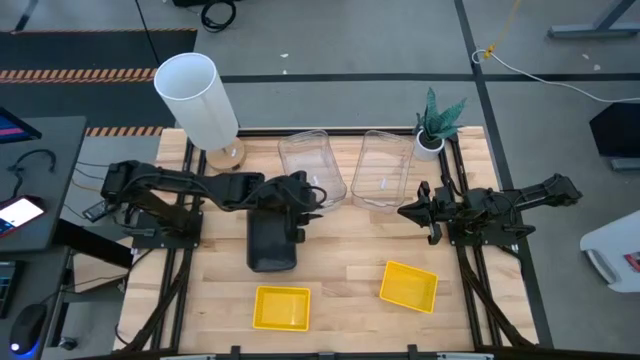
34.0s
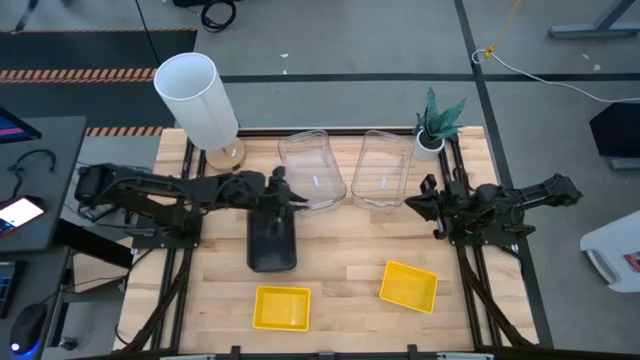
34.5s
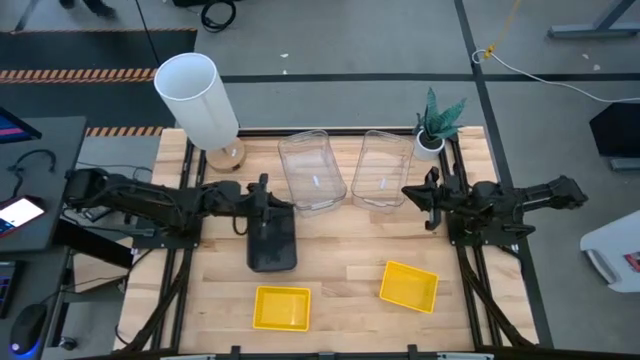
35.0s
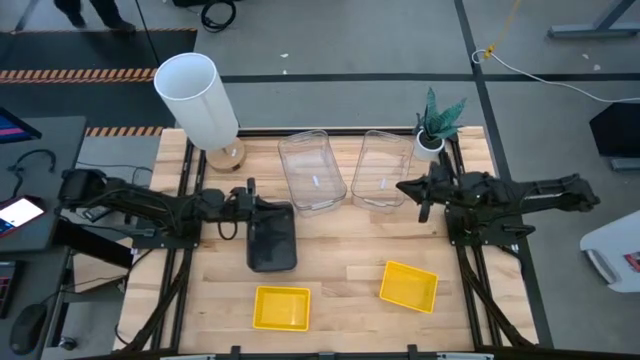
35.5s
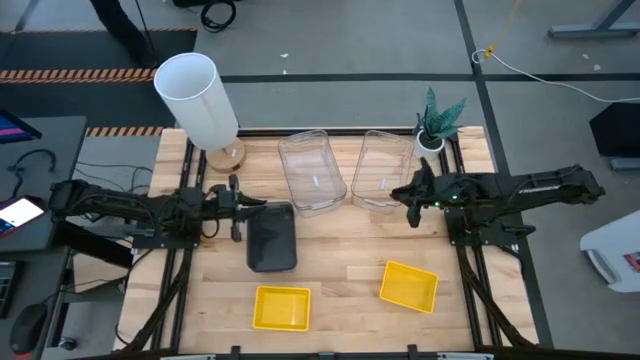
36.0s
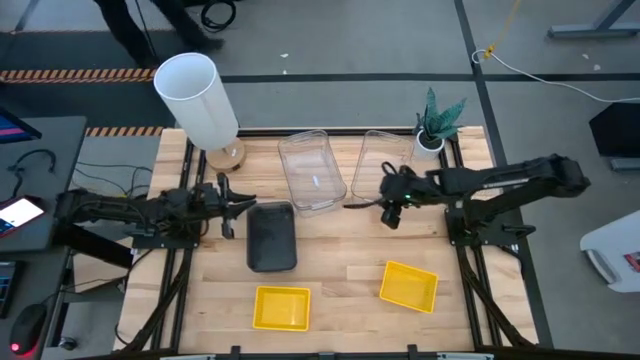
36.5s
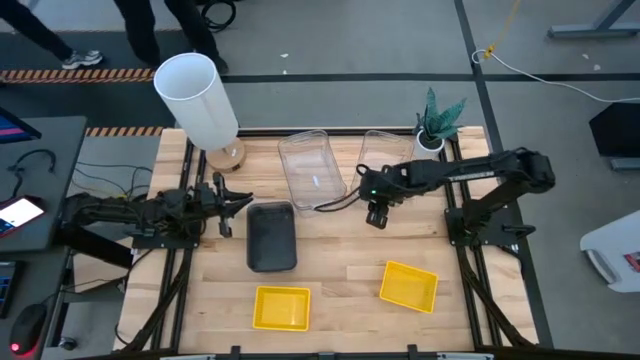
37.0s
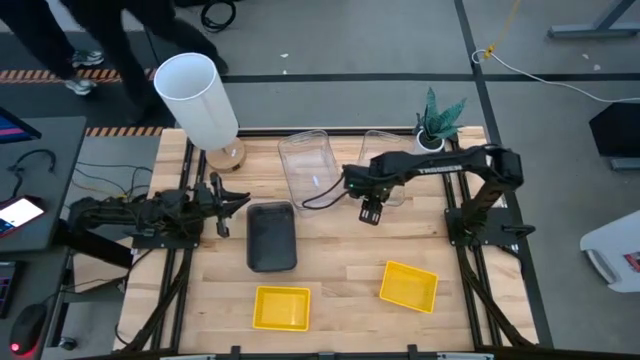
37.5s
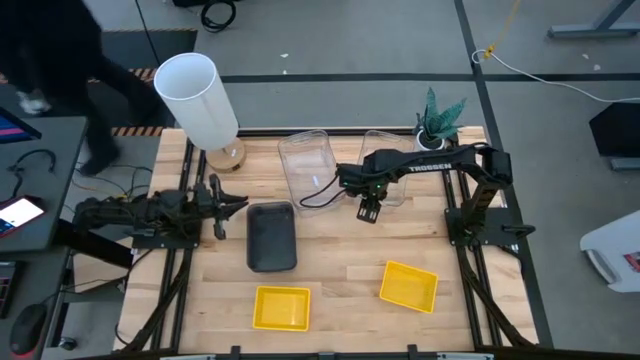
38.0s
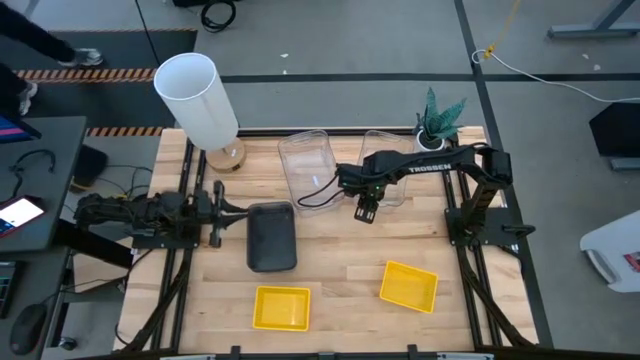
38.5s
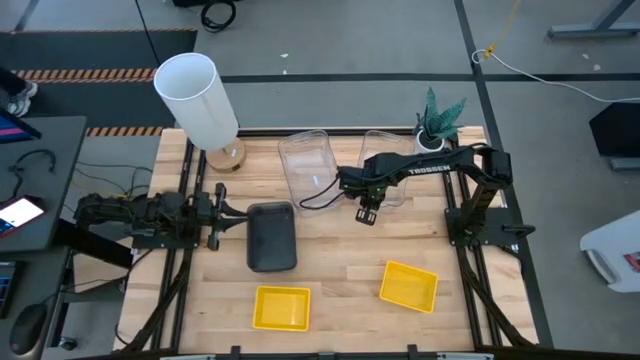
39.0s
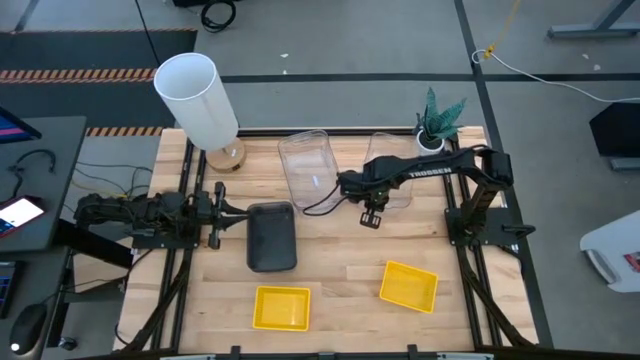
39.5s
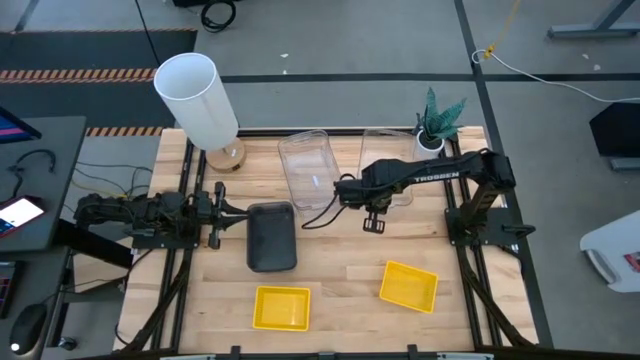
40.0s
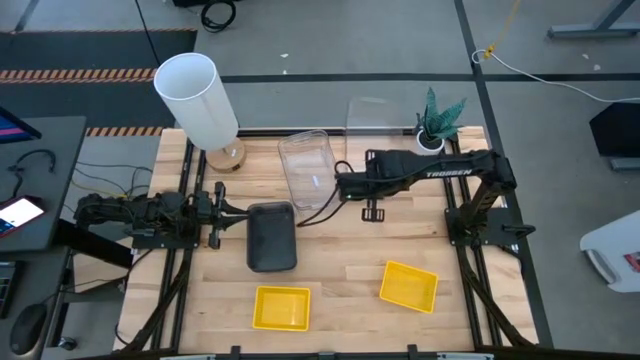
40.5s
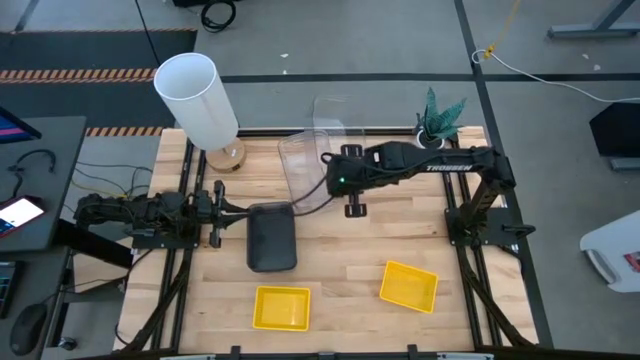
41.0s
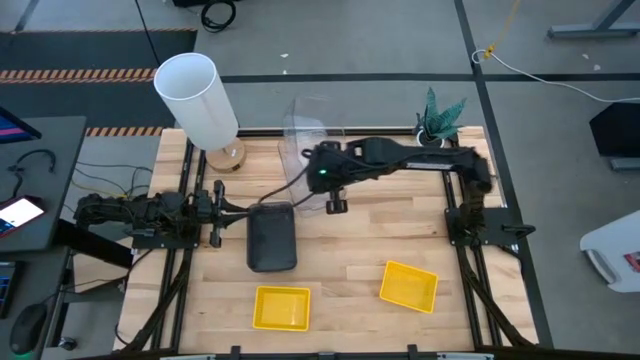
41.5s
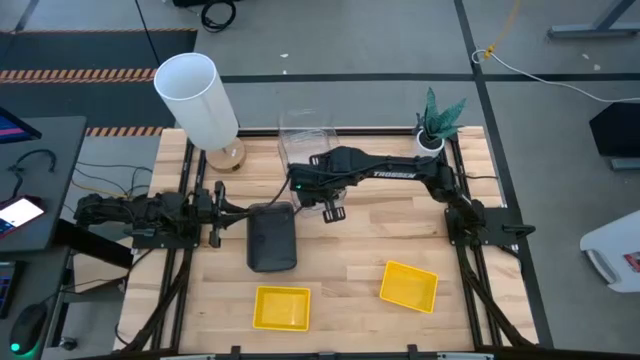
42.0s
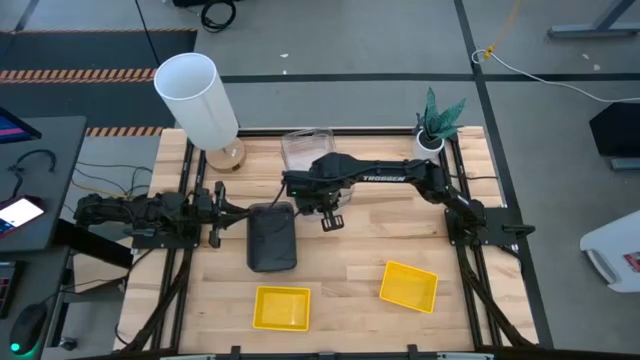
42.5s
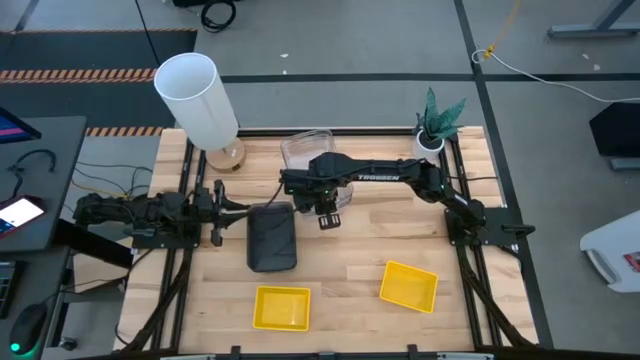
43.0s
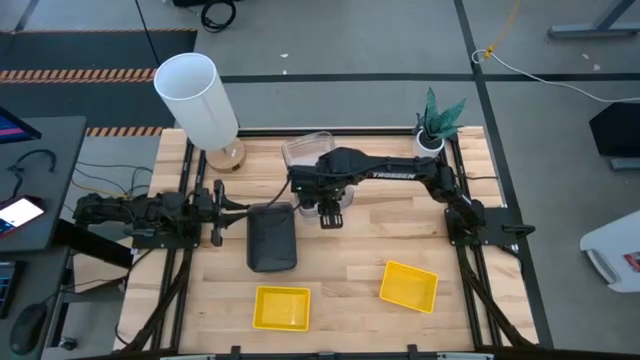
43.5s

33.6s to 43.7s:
Stack the right transparent bin on top of the transparent bin

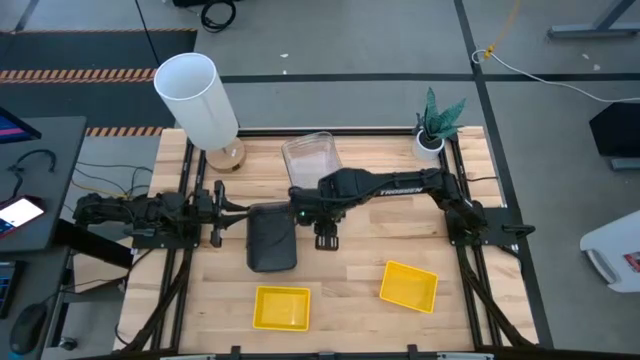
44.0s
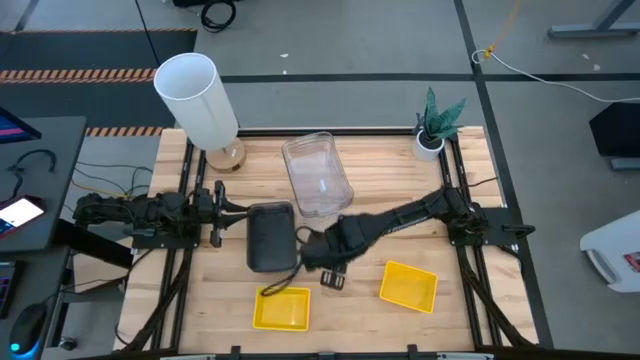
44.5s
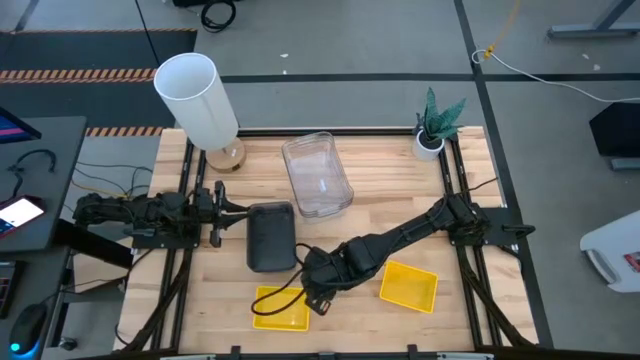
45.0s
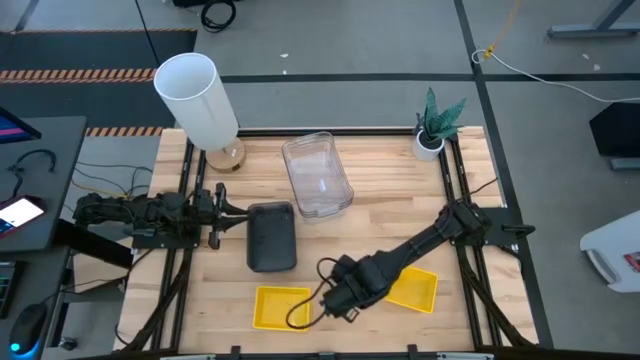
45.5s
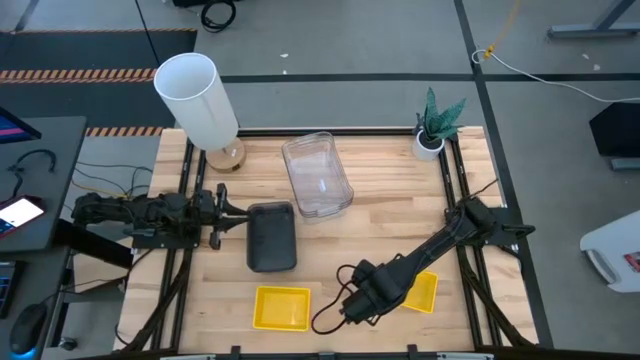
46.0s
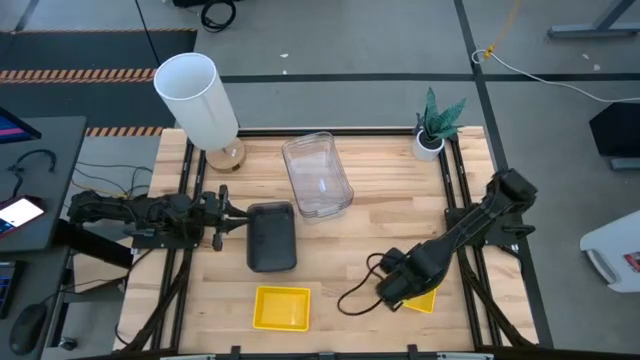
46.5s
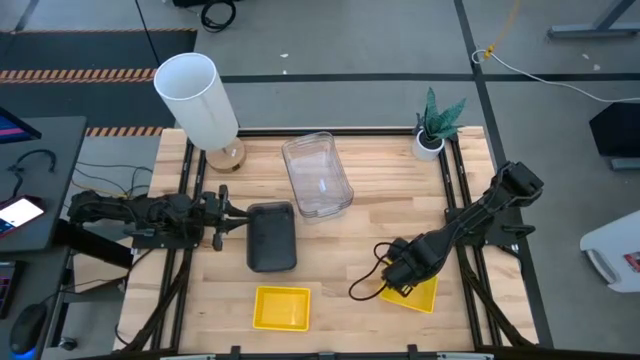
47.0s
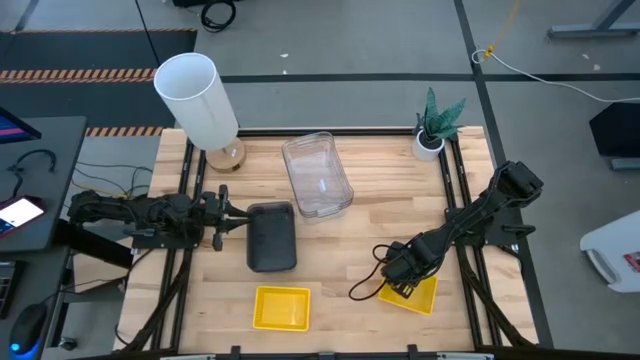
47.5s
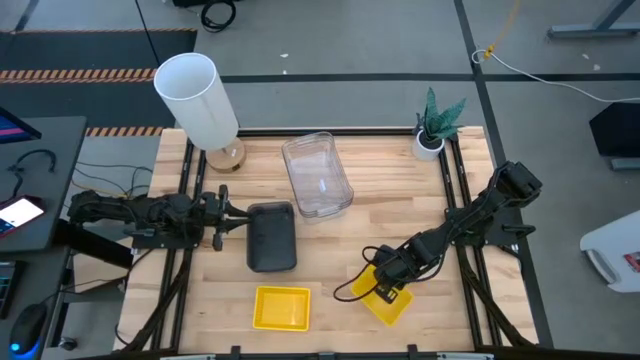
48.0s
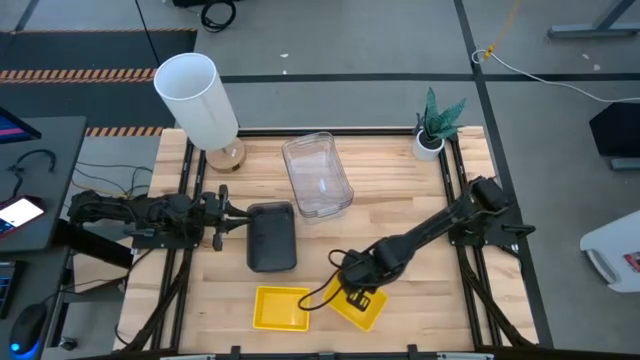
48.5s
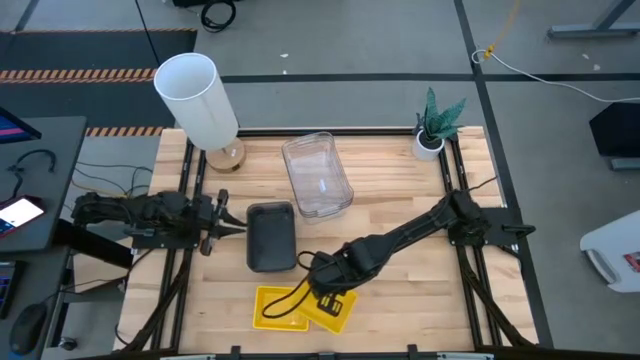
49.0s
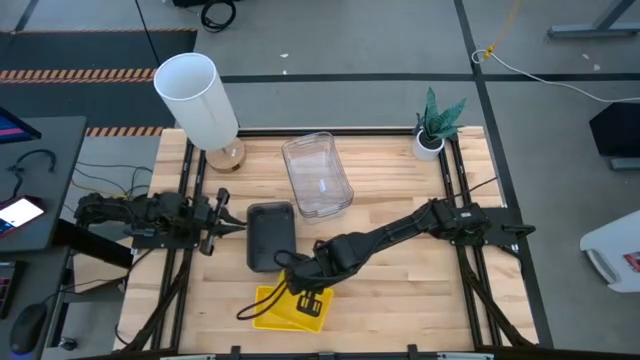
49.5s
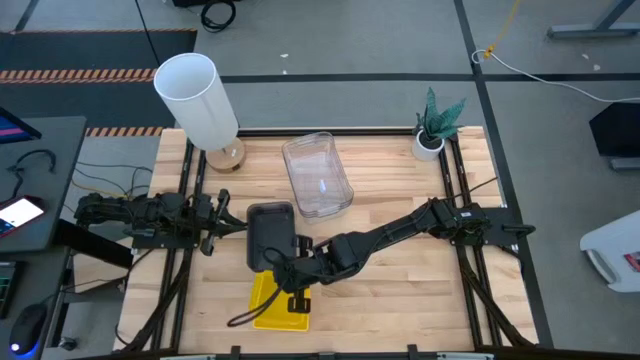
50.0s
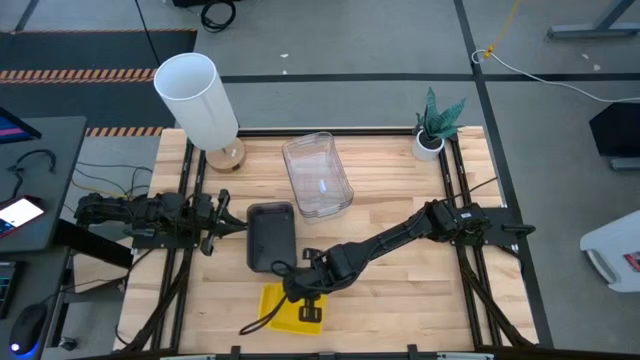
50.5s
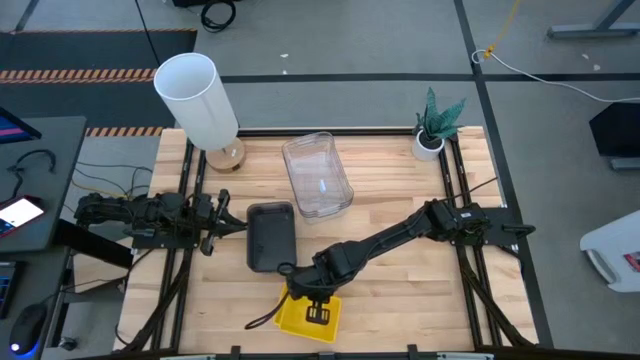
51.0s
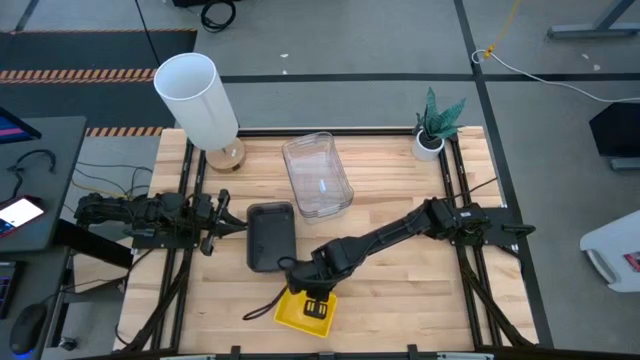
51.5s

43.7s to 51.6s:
Stack the right yellow bin on top of the yellow bin
